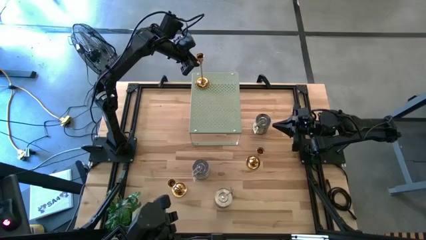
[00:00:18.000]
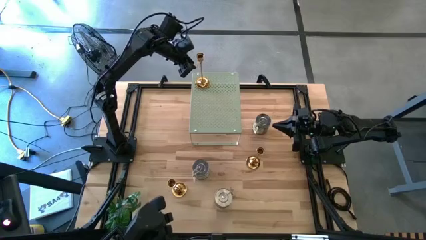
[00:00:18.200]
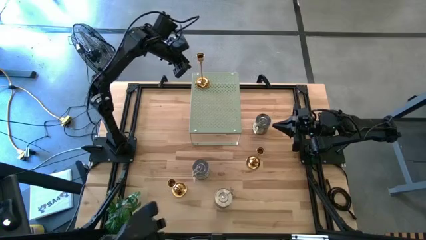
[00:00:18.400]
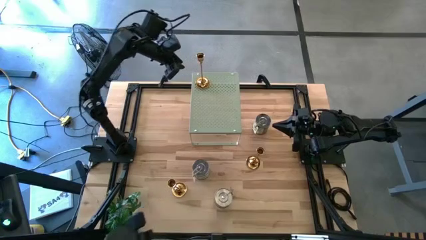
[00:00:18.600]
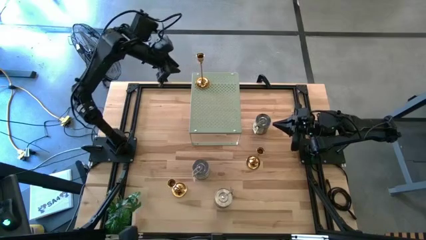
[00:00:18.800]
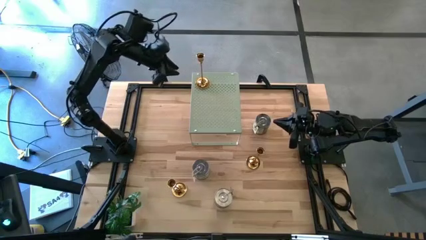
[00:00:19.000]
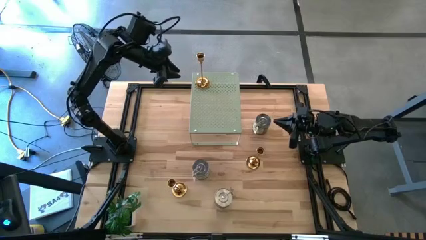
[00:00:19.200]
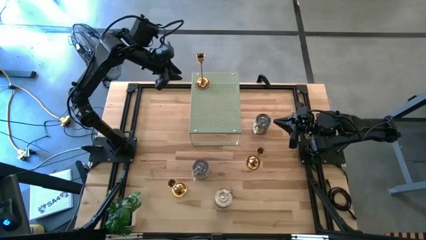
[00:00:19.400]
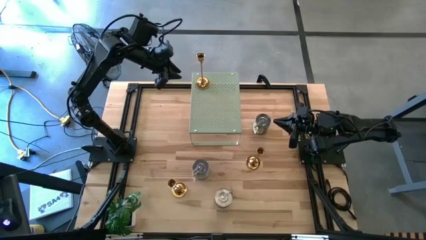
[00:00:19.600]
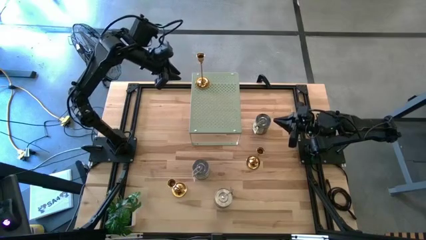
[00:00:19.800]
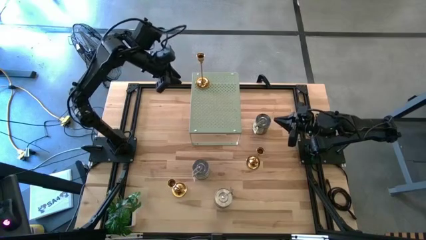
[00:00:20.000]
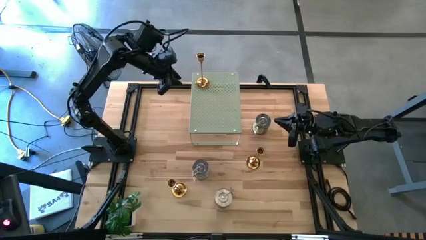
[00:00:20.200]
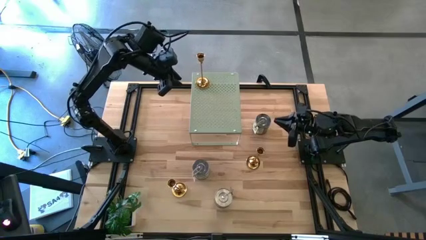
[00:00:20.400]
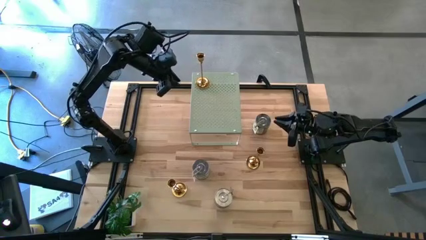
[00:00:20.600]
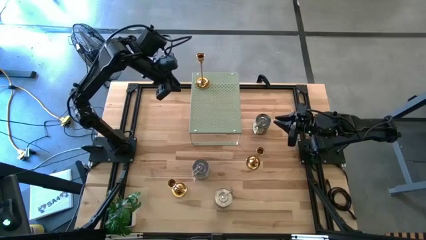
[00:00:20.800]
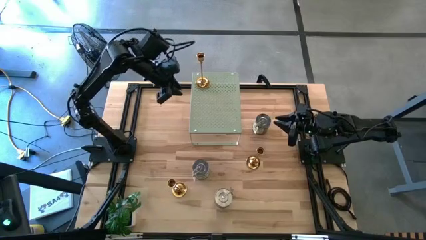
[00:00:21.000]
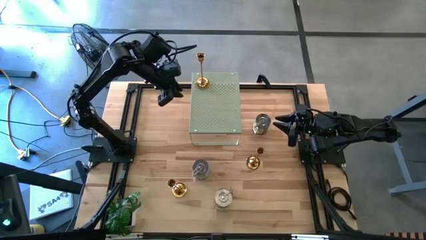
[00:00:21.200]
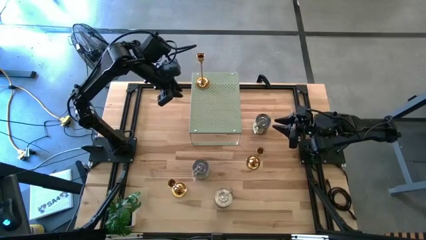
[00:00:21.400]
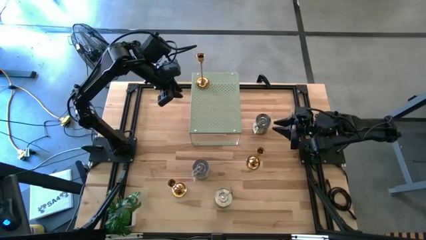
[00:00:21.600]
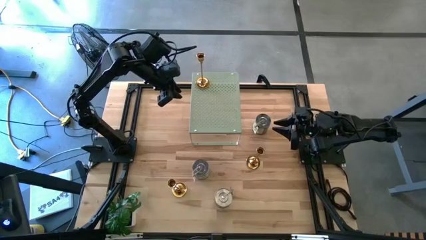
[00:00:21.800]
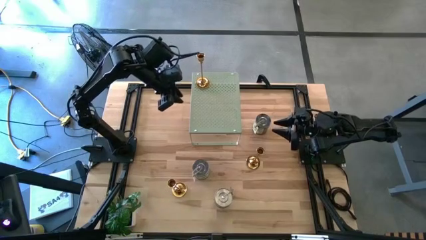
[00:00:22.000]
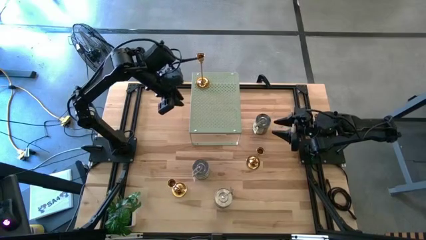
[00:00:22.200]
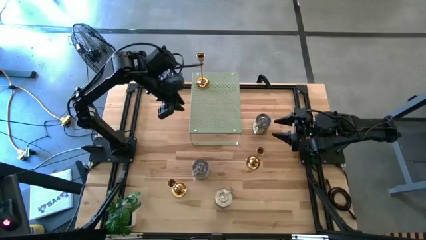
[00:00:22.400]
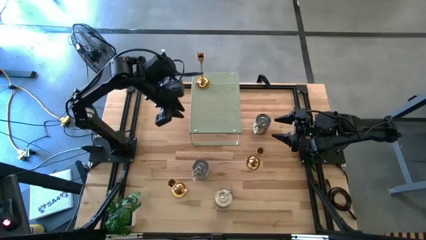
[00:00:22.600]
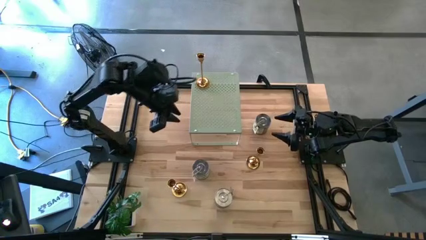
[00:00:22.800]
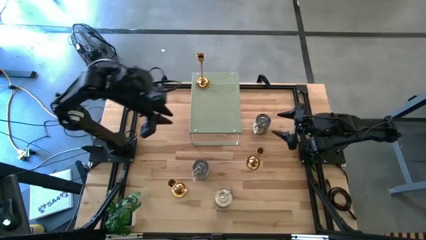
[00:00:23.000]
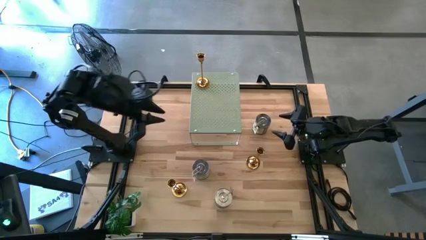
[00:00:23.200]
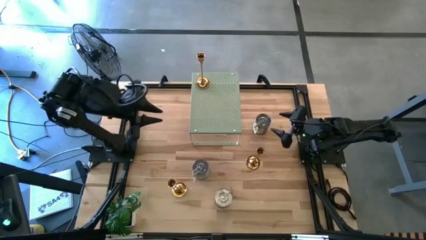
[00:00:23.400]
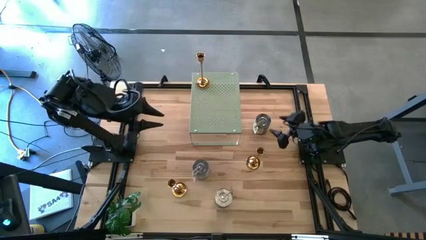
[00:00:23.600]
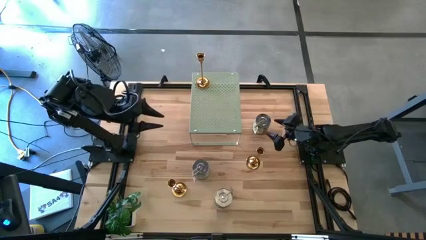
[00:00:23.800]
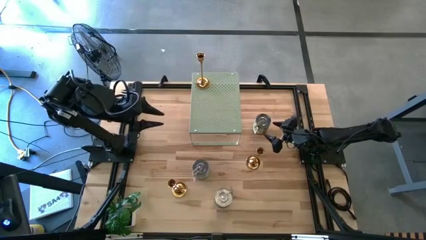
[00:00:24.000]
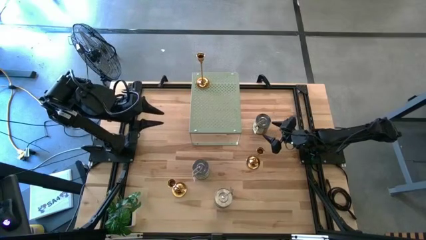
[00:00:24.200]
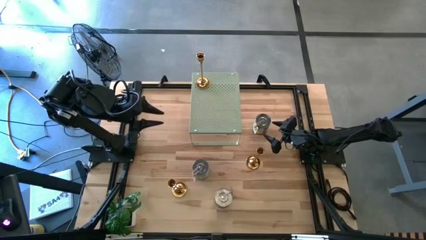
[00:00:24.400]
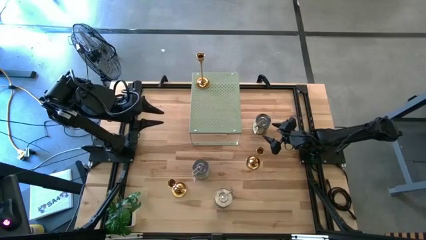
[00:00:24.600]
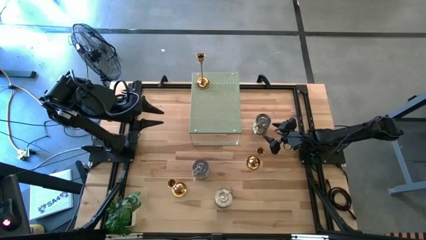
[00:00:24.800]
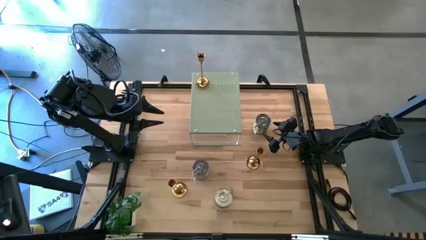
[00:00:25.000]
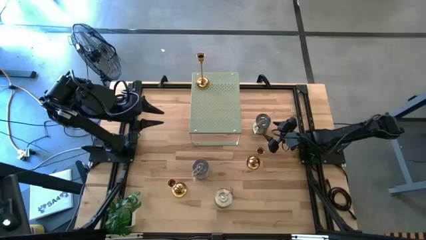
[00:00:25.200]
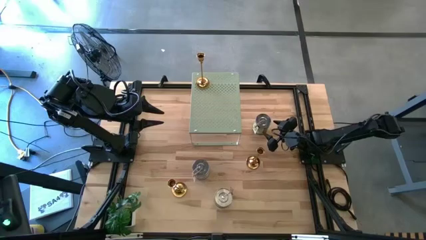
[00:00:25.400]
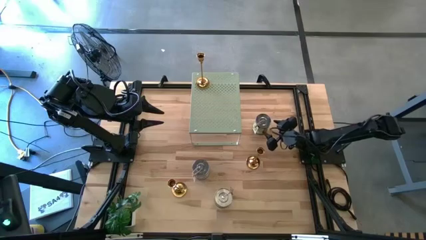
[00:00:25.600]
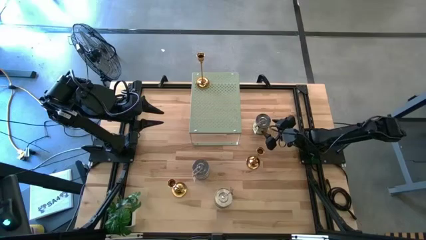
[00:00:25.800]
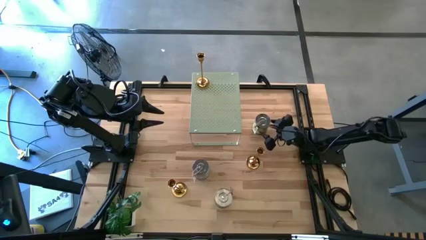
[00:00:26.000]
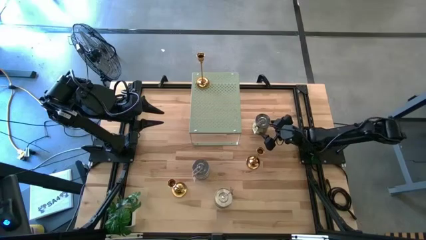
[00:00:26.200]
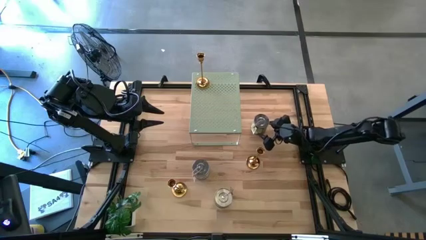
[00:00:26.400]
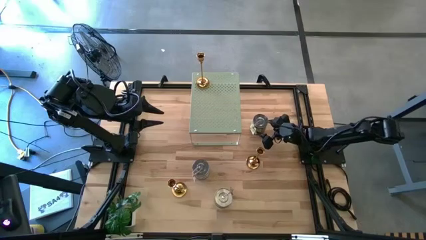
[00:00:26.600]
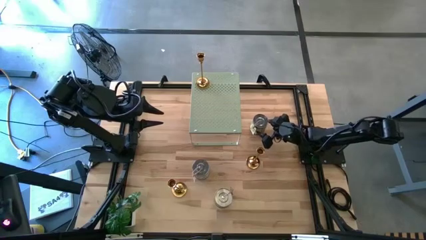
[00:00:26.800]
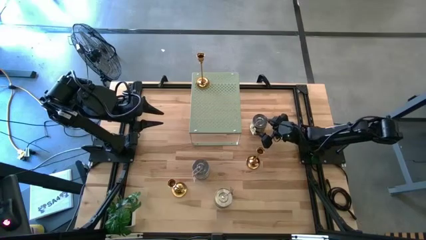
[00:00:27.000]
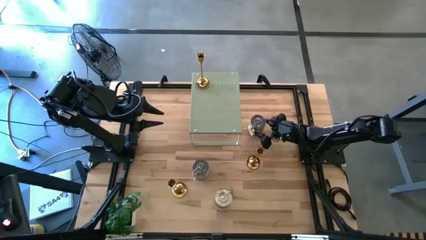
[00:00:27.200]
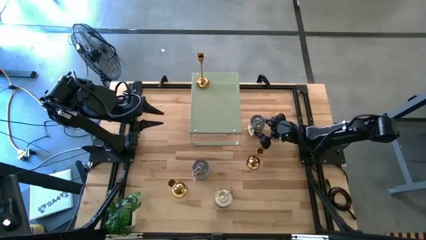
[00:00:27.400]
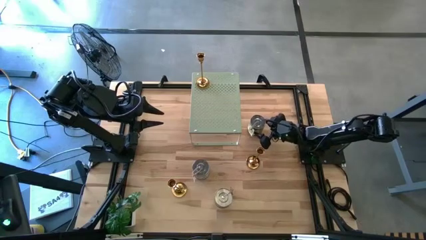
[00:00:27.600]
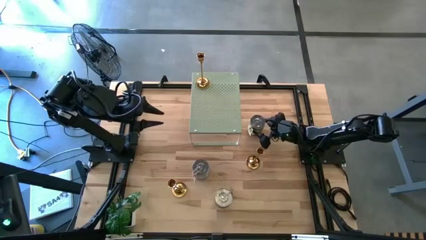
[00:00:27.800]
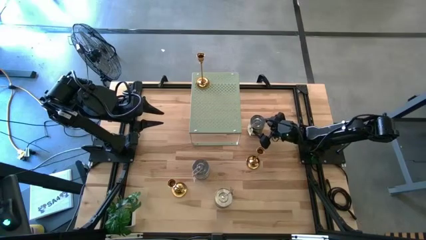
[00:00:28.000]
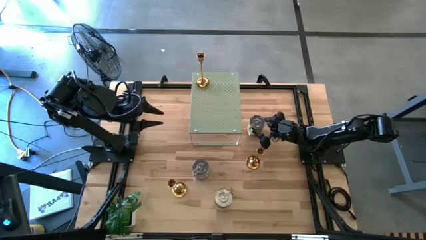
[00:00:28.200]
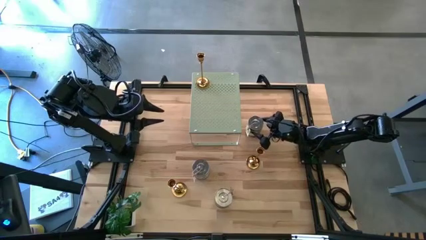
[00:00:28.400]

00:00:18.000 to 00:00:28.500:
Task: Pick & Place candle stick holders
Put the top green scented candle on the shelf

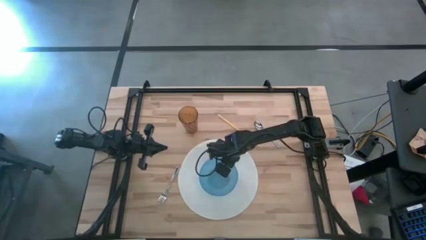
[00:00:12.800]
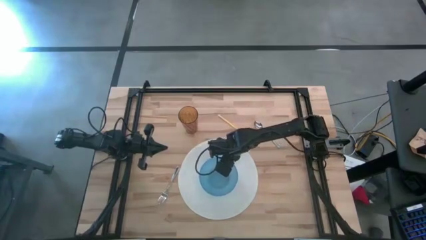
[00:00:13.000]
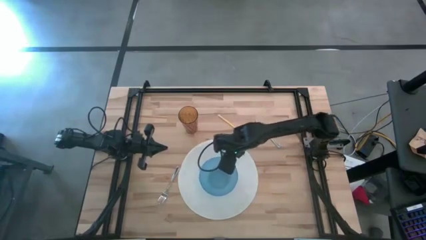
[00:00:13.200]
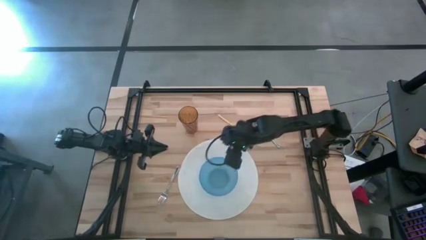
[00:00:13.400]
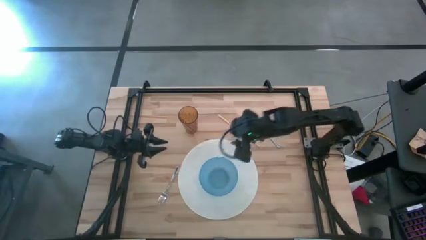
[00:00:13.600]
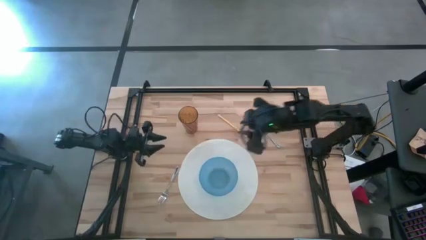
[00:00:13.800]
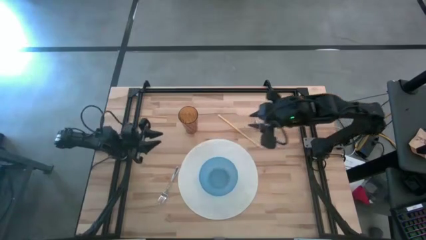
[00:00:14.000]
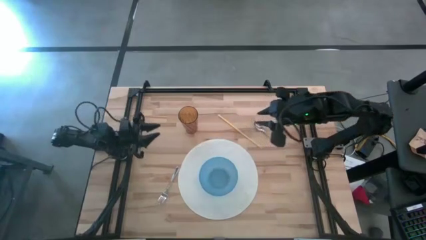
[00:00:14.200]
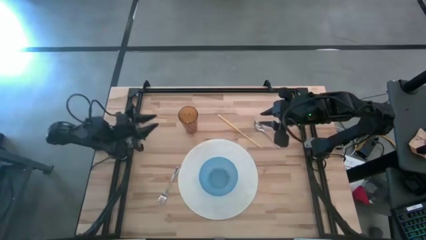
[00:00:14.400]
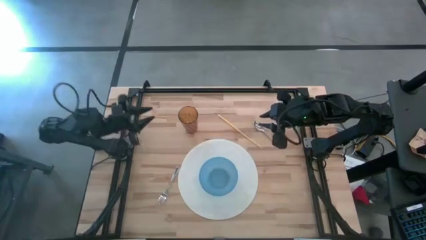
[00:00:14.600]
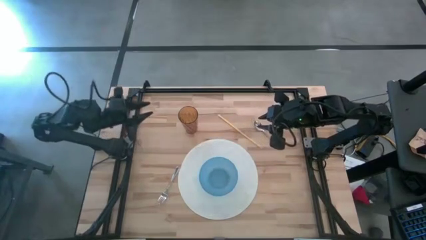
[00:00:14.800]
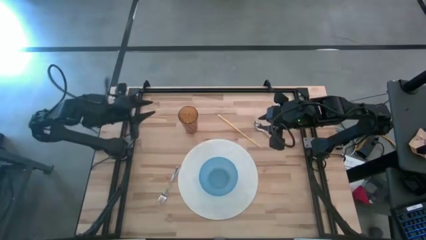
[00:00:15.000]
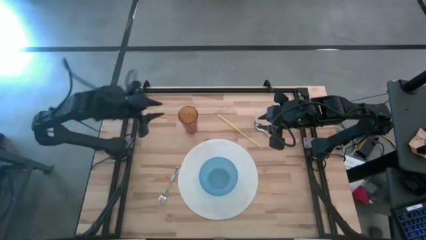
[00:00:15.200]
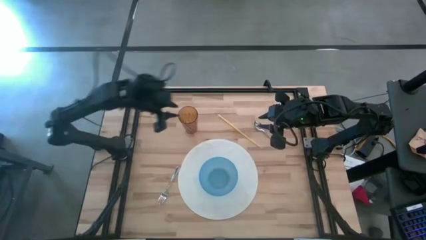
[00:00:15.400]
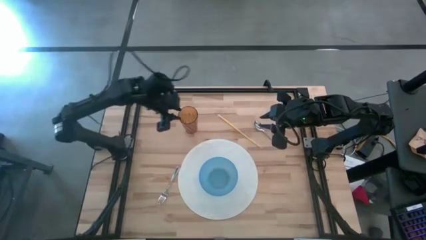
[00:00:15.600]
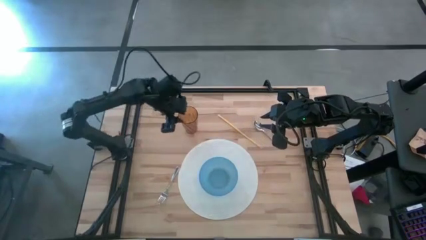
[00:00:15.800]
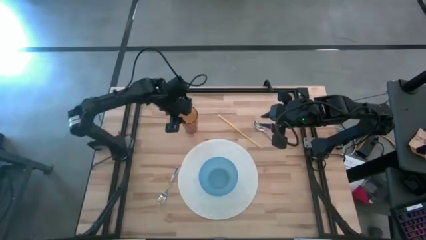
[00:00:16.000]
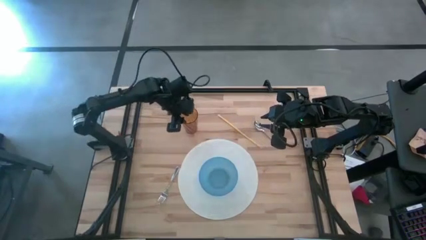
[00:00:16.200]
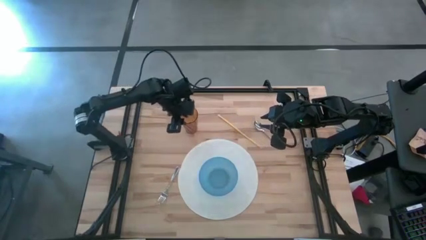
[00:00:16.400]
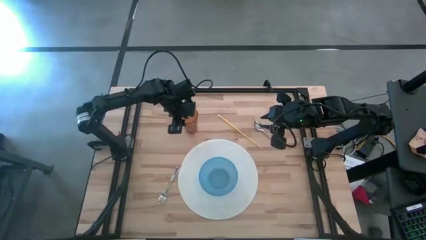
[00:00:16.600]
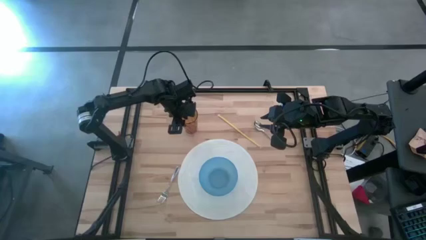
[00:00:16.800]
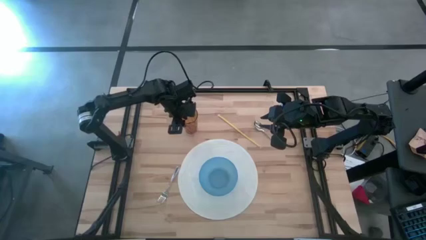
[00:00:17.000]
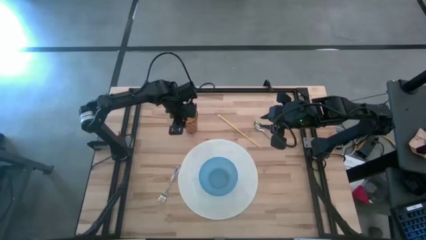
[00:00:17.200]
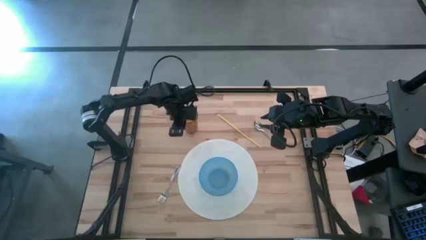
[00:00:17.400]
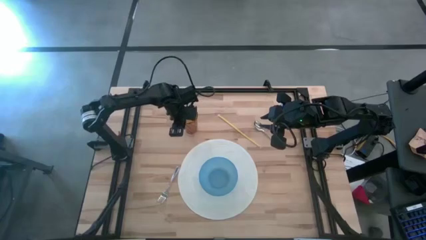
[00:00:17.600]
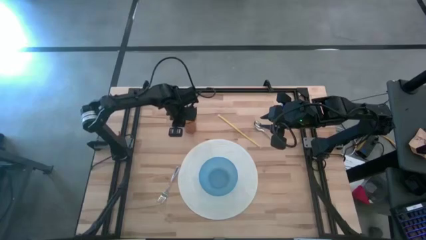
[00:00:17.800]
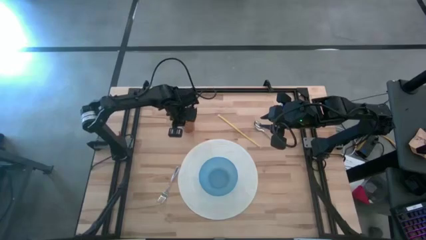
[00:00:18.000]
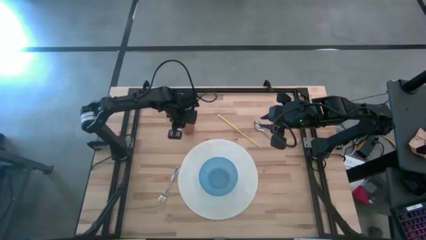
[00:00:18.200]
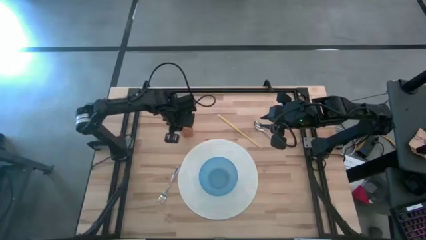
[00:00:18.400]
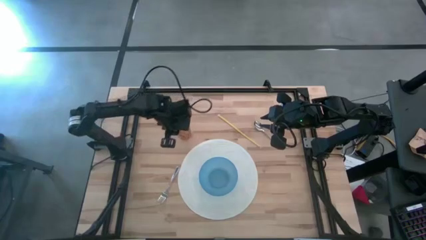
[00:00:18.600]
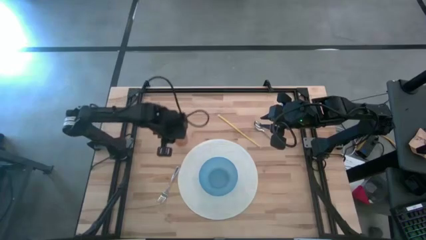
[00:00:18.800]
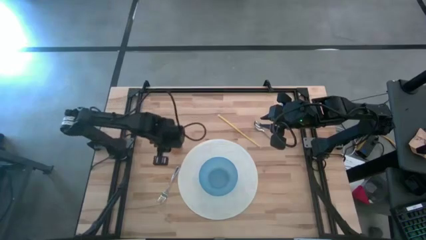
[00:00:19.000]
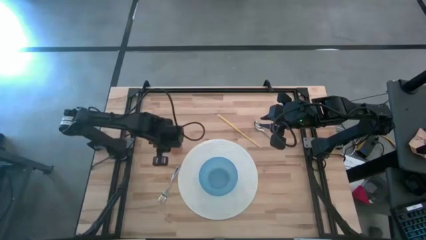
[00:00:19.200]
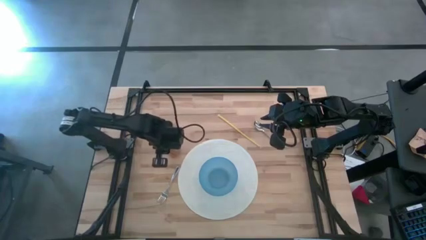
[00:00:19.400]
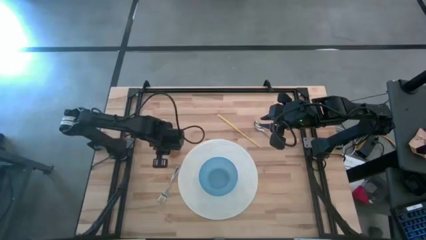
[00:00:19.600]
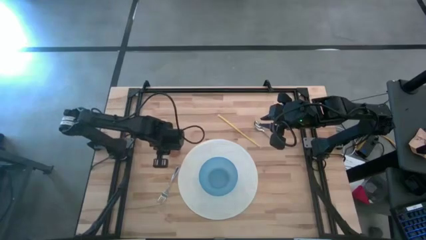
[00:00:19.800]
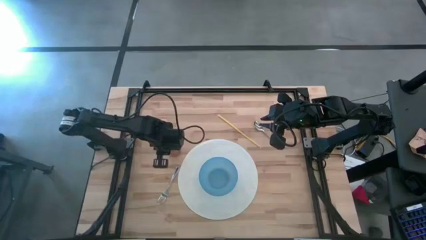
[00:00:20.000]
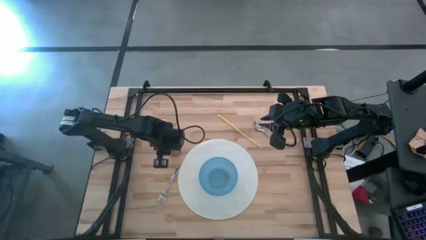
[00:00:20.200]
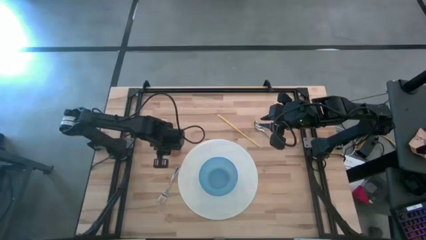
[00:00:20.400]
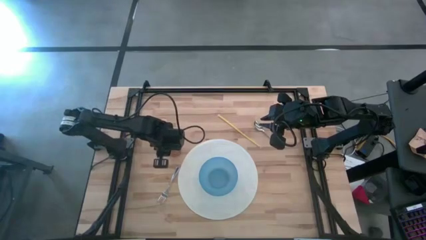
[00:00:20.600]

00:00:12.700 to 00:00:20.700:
Task: Pick & Place Utensil
Put the orange cup to the top left of the blue bowl
